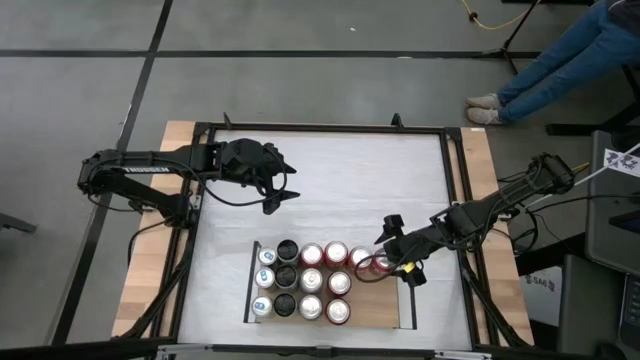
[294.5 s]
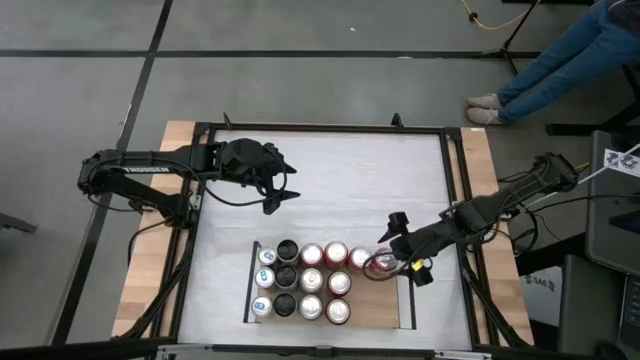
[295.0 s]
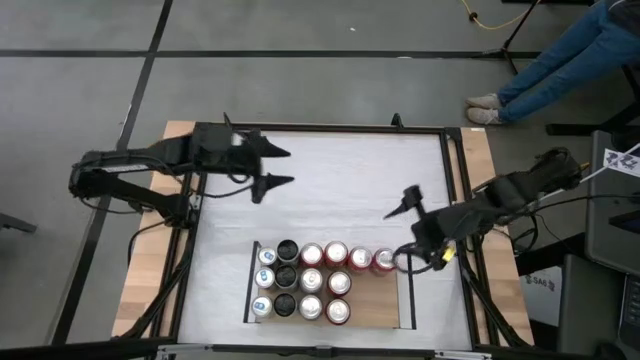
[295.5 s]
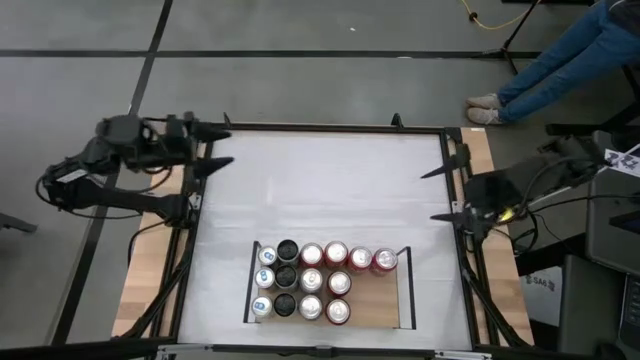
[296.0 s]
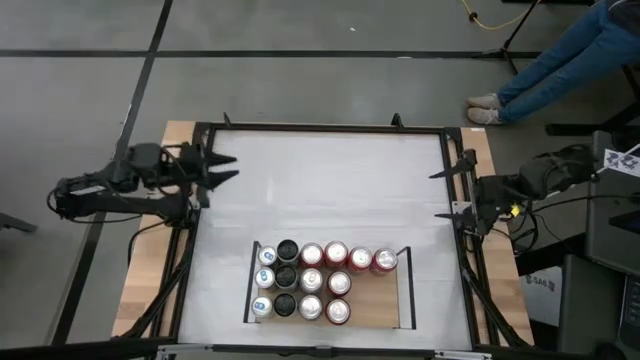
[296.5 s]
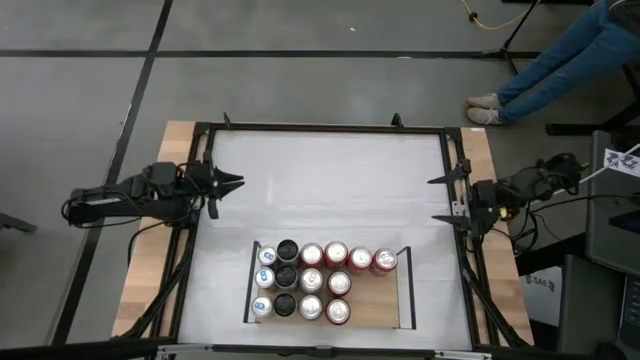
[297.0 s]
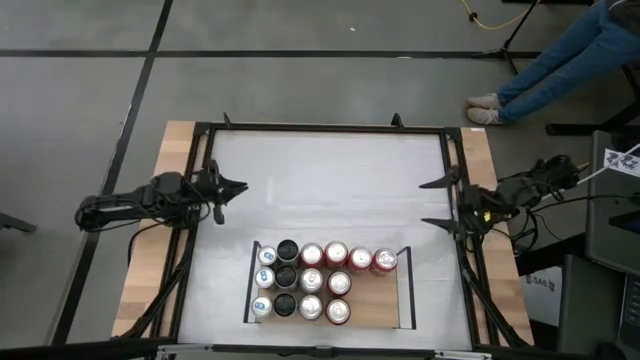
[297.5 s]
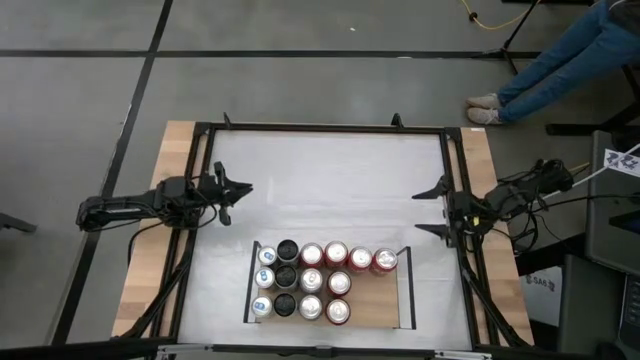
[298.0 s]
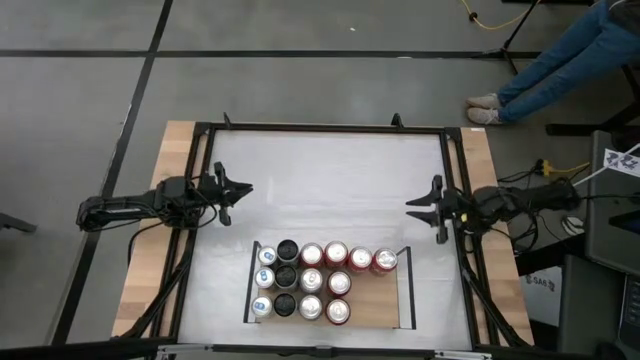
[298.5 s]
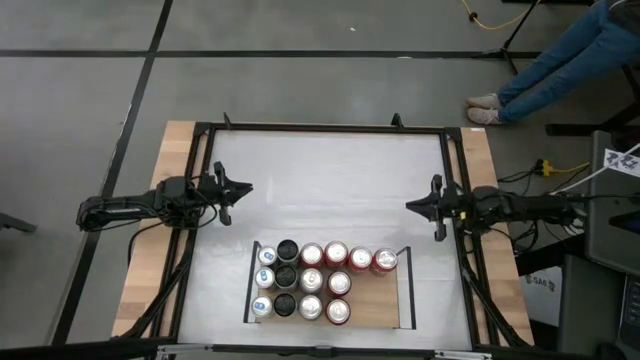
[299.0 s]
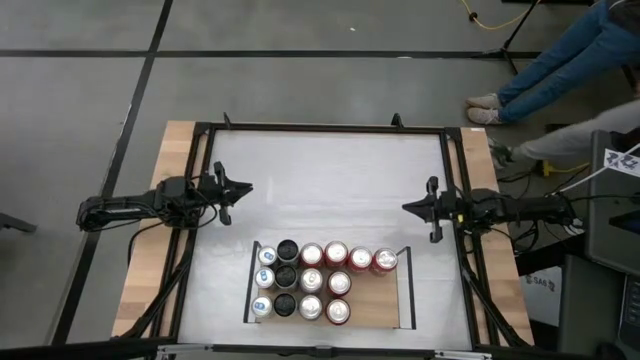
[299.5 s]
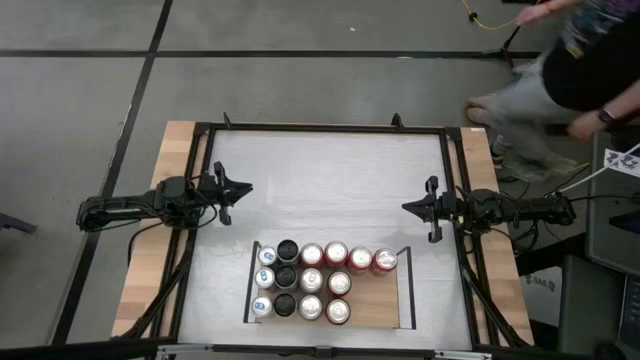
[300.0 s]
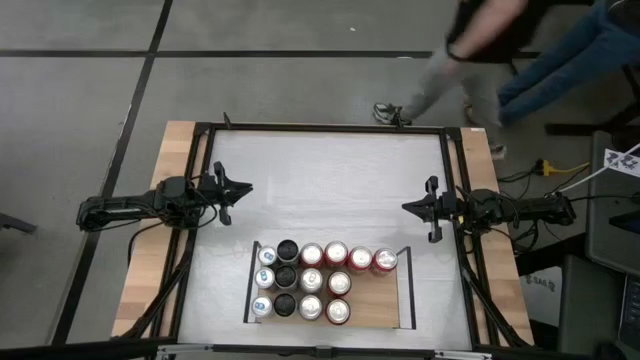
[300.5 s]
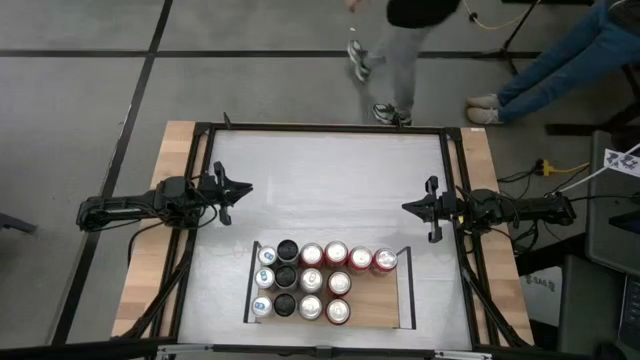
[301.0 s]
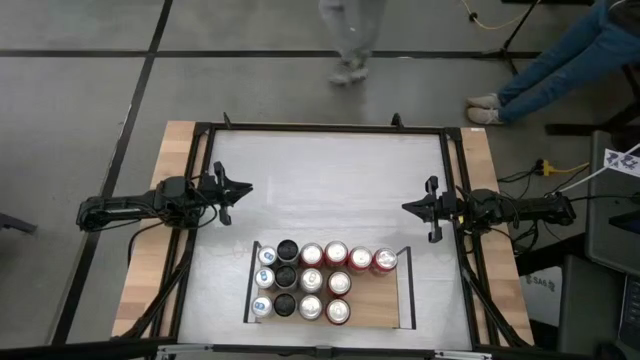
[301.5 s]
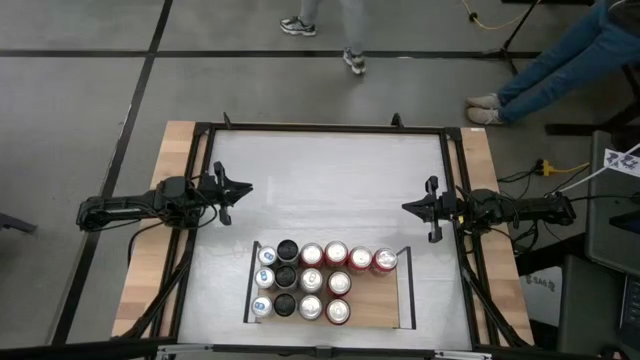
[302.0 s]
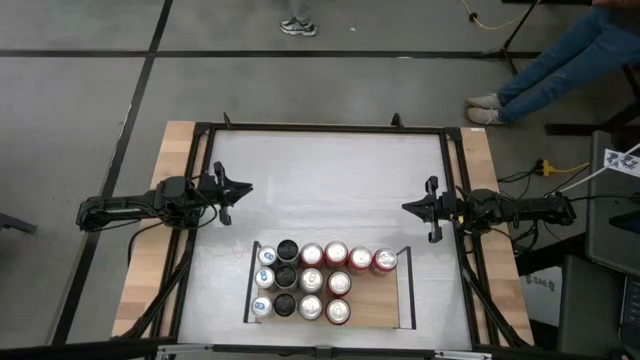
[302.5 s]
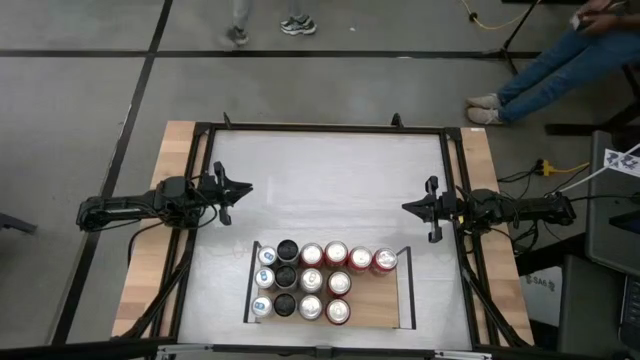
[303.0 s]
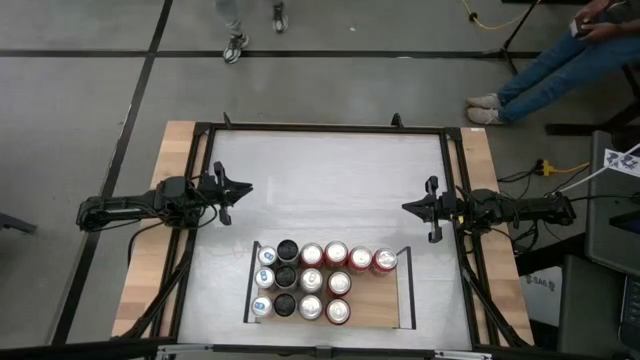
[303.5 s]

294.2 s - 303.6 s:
Task: Place canned beverage on shelf
Return to Home Position
